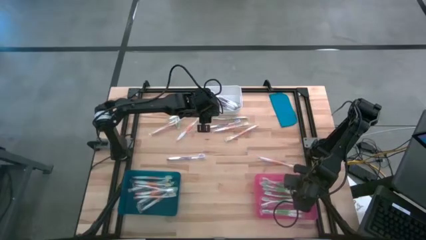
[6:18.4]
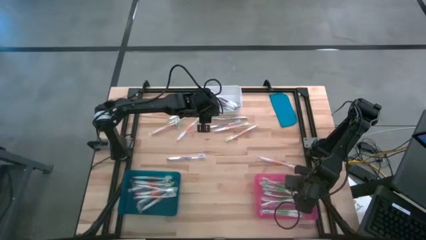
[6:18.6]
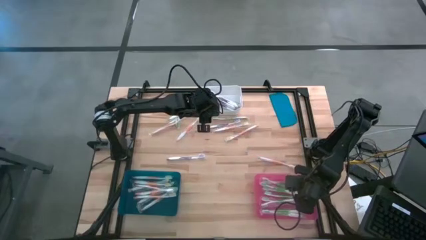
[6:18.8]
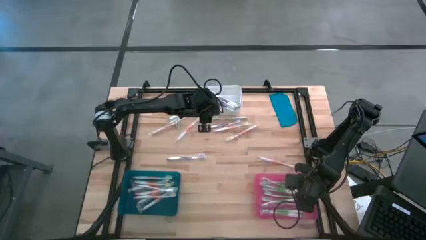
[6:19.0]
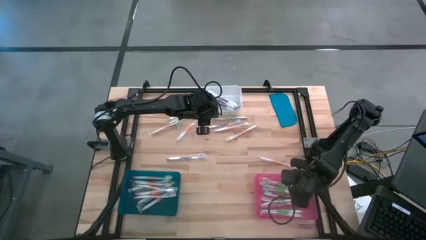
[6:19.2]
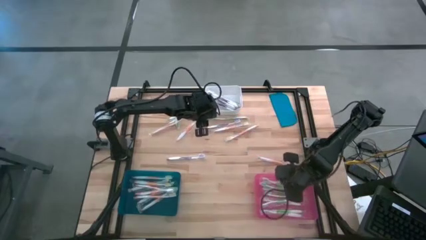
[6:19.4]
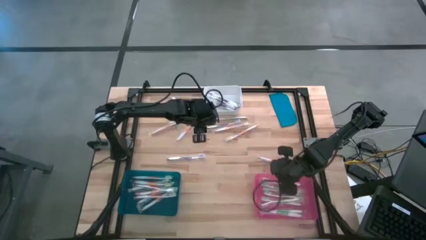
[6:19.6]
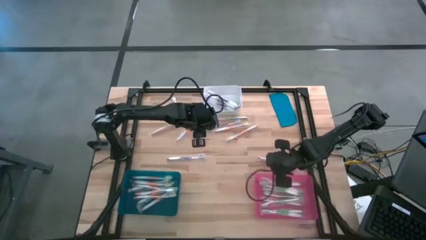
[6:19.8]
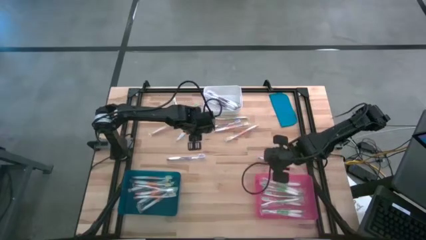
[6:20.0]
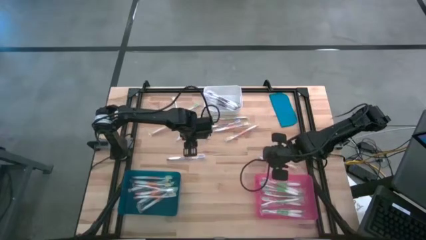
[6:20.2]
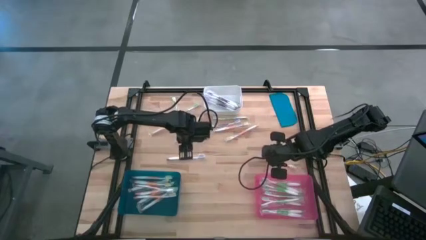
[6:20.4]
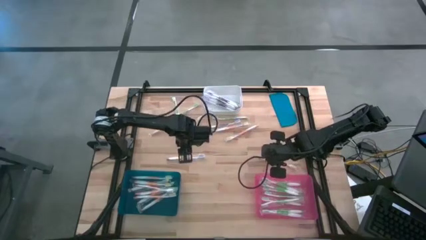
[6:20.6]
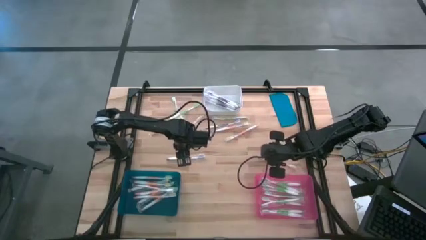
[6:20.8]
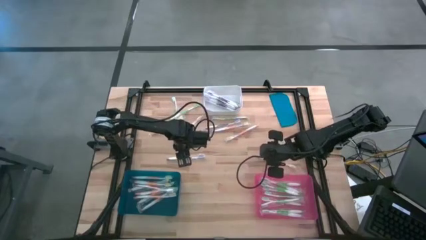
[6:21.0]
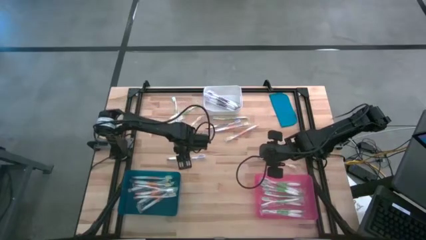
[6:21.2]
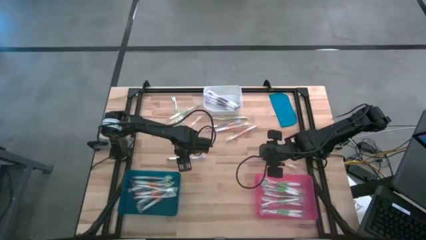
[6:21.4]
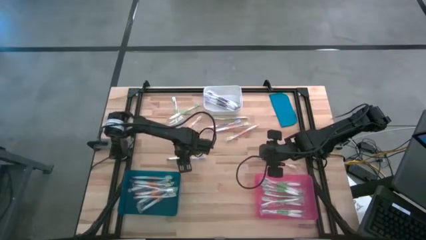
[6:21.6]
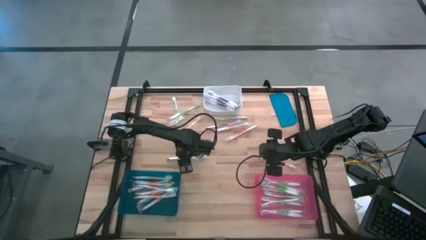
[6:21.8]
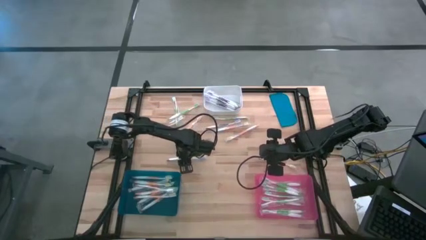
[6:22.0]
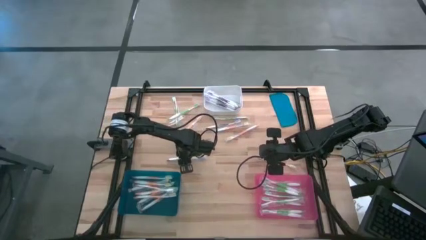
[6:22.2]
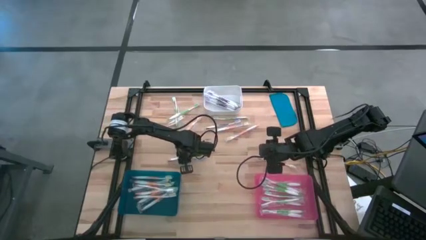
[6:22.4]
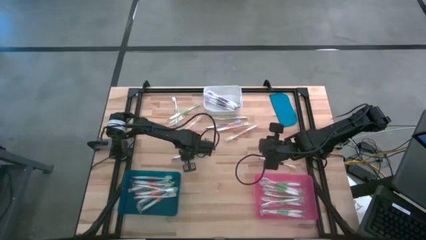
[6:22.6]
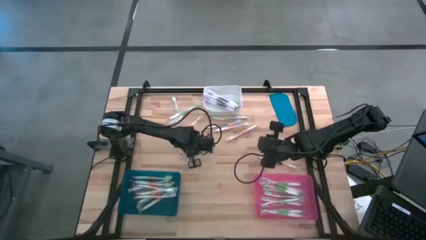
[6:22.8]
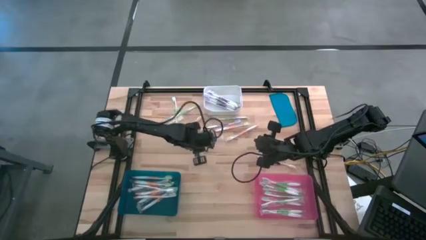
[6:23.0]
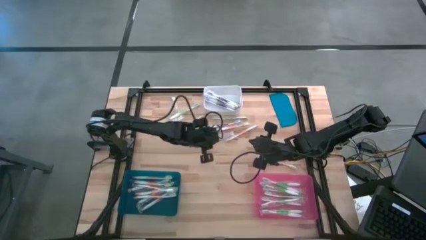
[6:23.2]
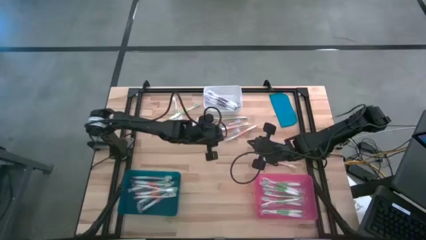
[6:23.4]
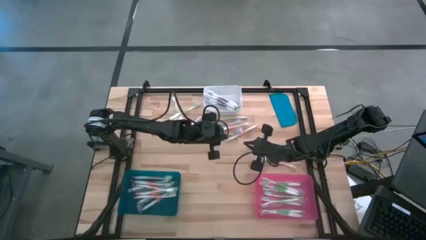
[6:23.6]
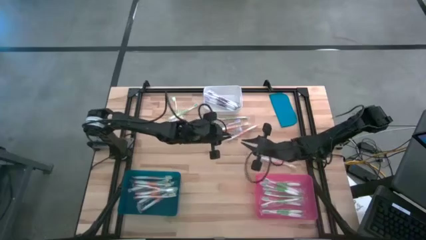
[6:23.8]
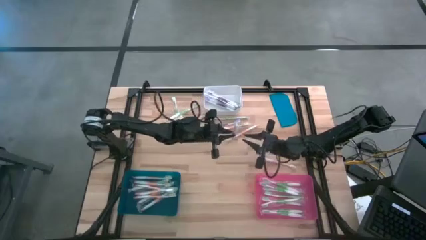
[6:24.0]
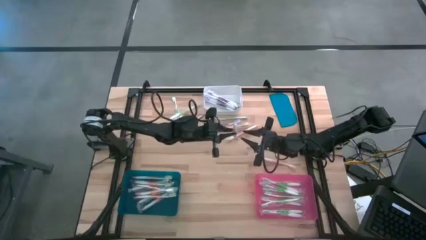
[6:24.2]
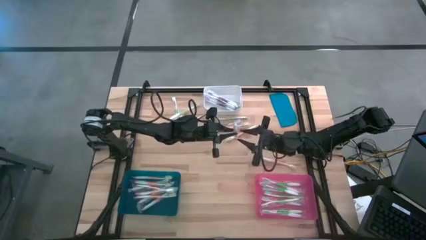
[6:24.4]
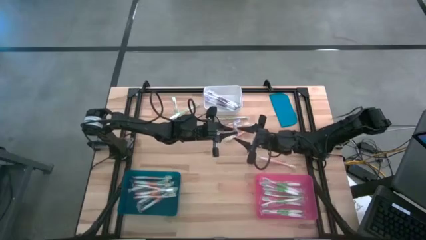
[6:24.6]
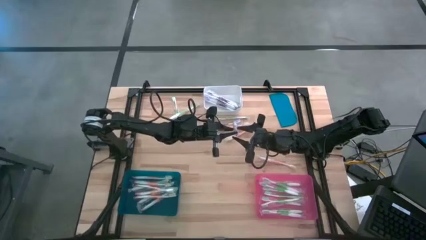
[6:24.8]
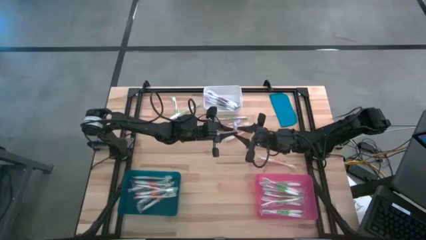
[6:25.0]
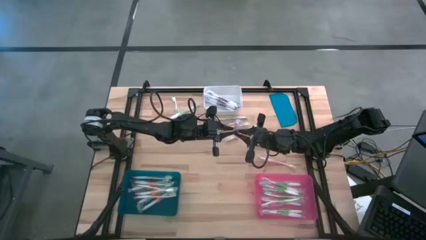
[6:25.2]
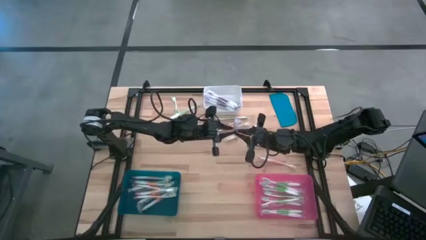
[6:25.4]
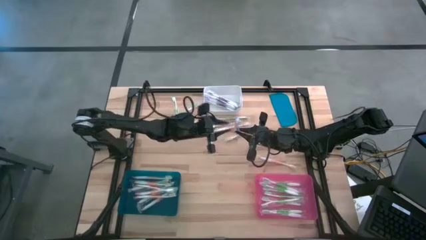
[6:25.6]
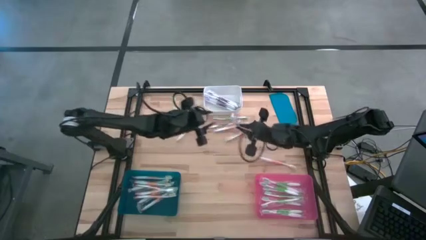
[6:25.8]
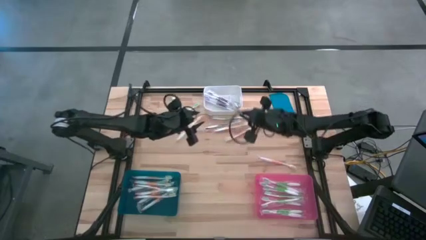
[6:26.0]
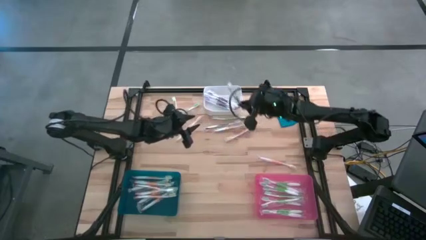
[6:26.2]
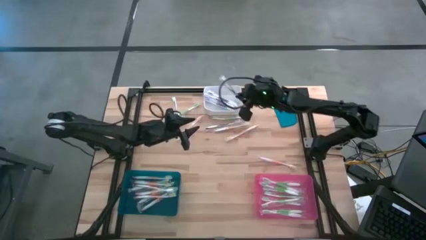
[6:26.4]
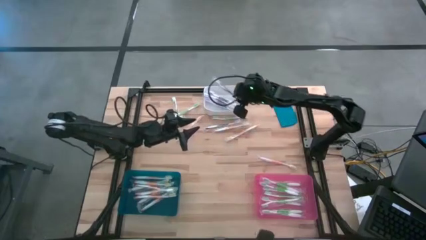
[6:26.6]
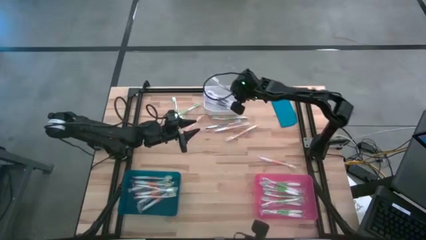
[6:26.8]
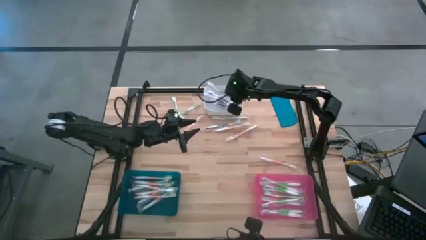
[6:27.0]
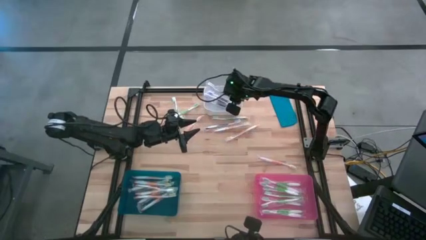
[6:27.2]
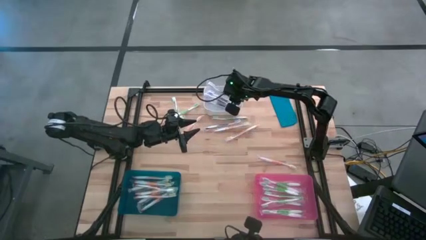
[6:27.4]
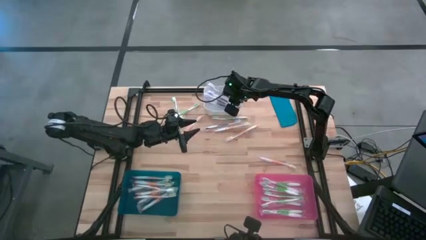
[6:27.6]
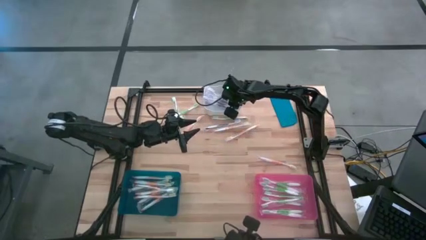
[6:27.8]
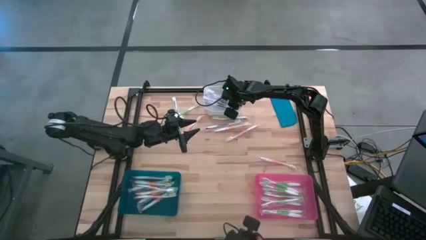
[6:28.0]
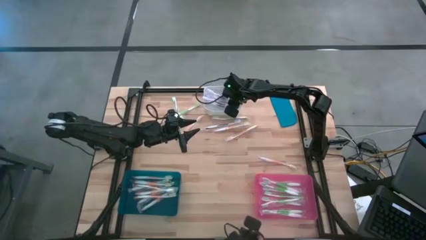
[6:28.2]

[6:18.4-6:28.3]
Task: Pick & Place Toothbrushes
Put the violet toothbrush into the white bin

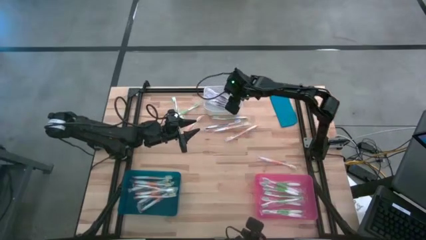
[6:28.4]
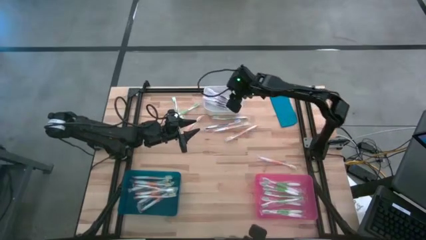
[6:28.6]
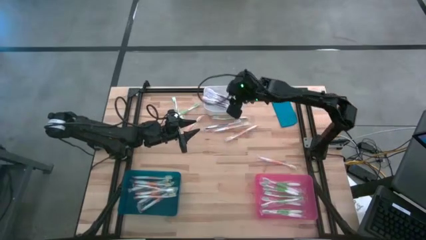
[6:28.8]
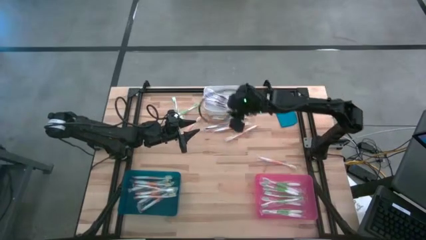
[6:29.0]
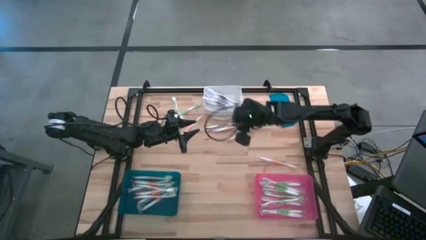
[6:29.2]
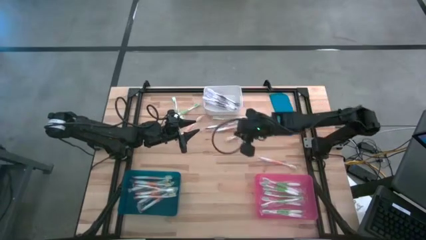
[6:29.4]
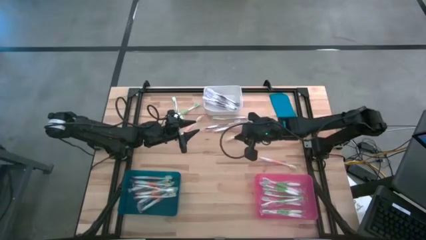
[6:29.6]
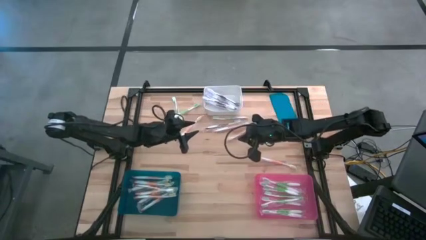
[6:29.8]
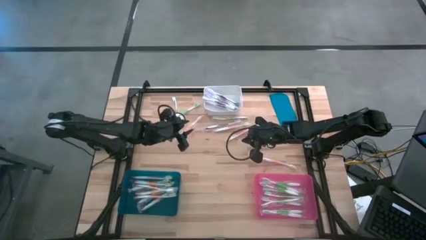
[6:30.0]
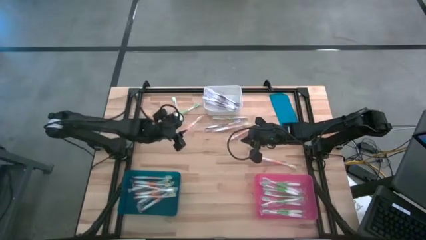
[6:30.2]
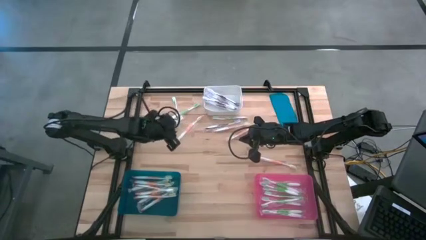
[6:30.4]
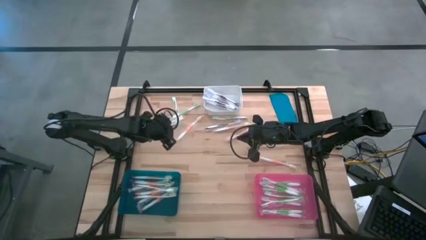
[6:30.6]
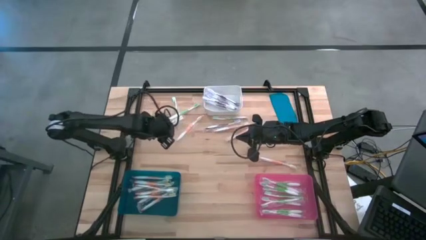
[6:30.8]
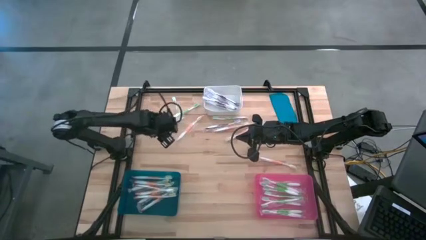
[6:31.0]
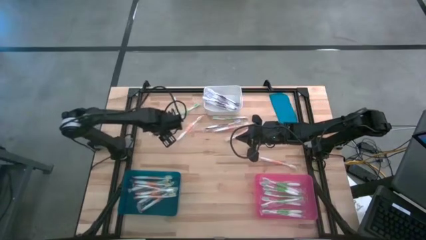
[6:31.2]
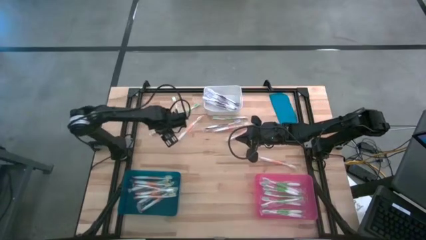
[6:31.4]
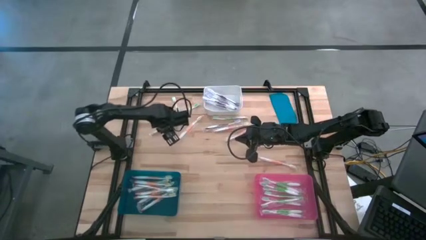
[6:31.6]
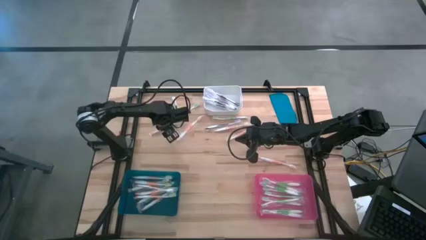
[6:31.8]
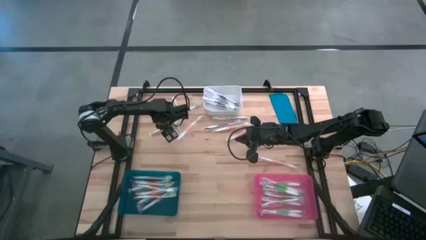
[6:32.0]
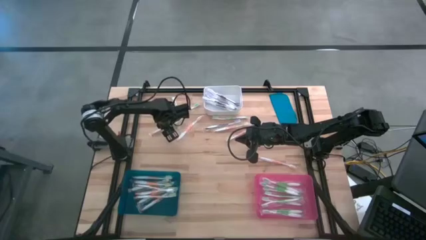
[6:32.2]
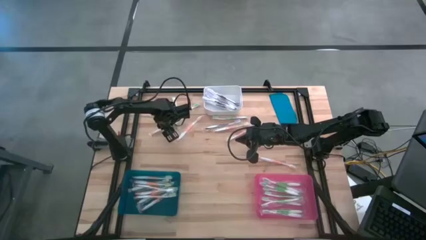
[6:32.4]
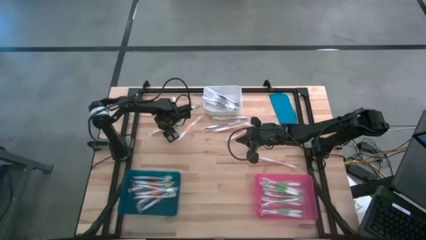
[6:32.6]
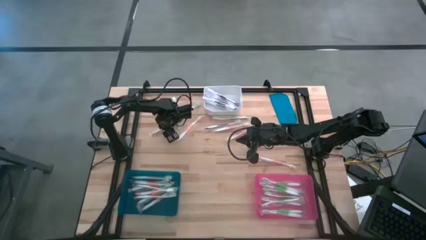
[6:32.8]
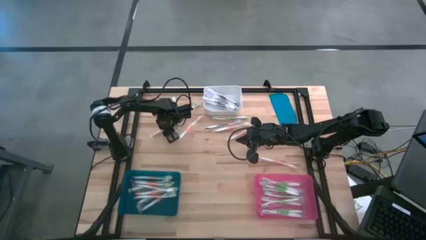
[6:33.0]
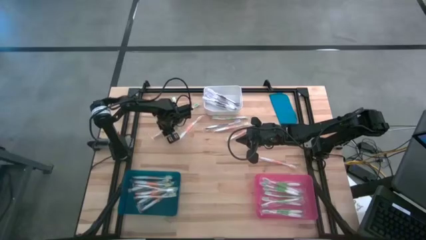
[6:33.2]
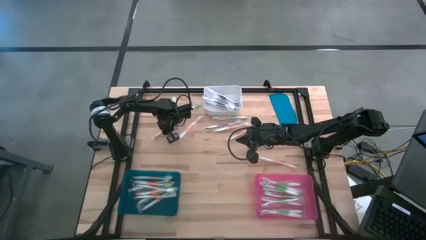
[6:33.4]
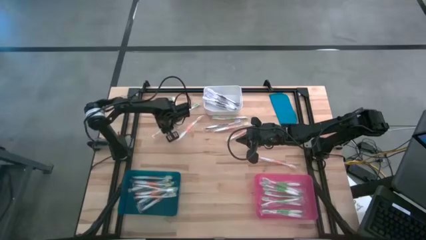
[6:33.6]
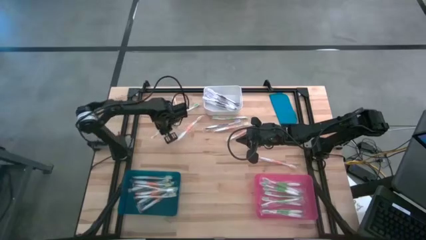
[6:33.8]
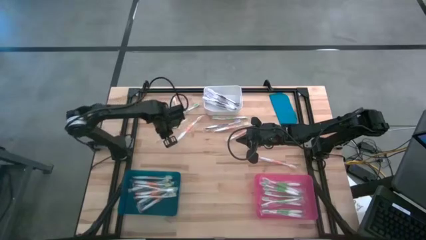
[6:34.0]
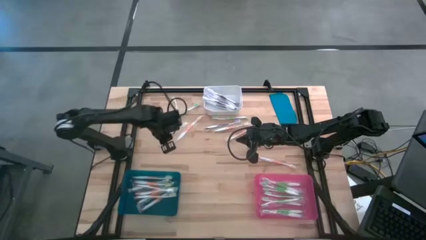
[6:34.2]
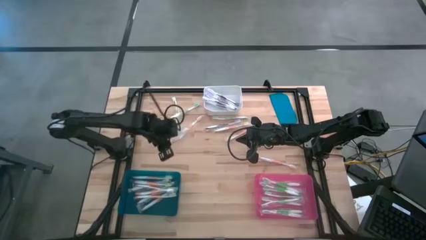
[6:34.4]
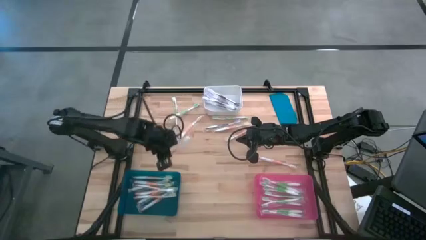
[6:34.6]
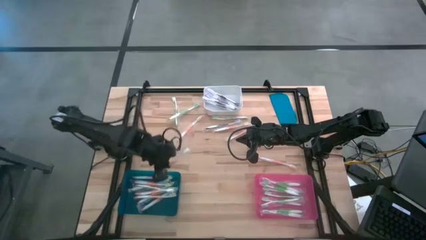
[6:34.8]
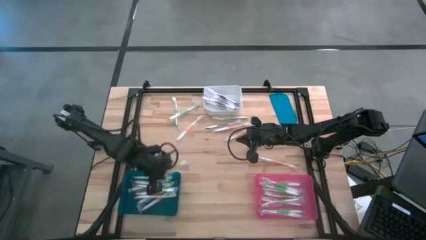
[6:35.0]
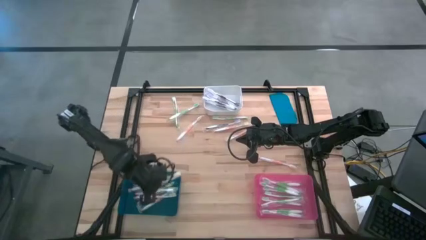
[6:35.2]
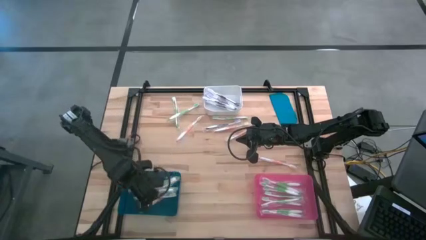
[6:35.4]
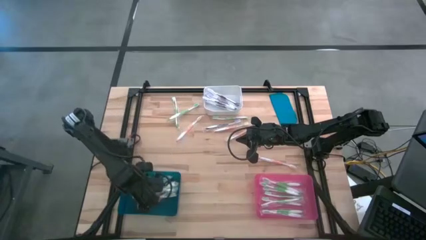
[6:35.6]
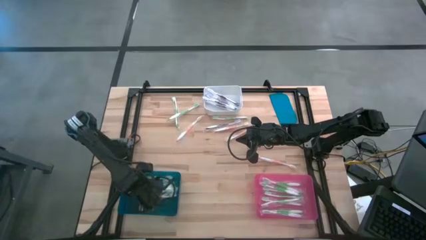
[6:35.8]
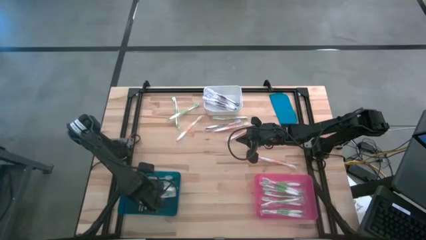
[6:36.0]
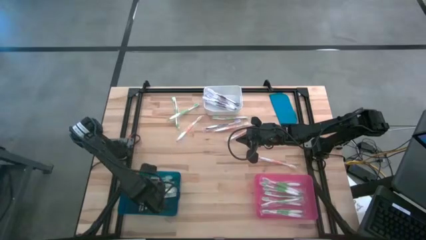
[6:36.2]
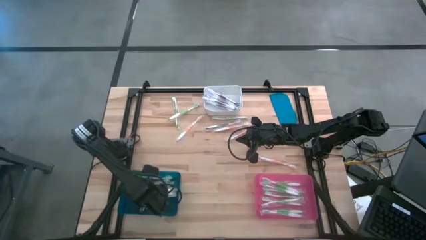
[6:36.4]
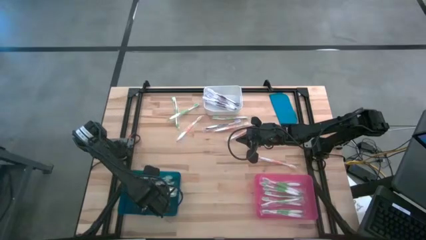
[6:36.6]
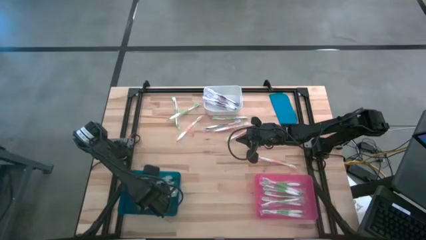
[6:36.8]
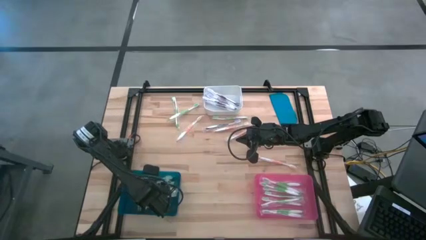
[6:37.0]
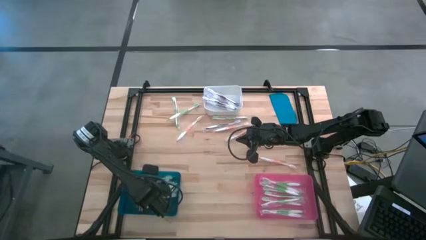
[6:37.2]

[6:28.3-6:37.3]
Put the orange toothbrush into the blue bin
